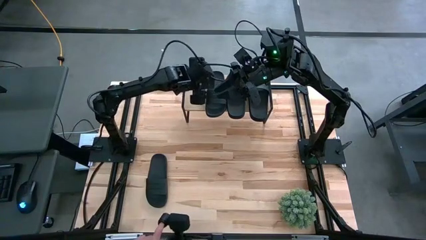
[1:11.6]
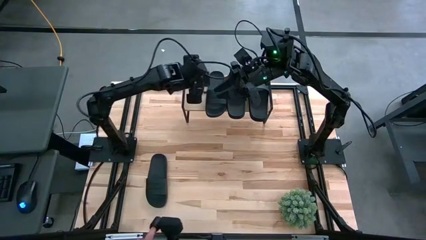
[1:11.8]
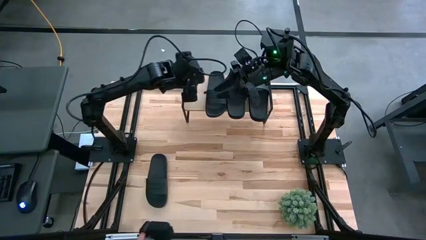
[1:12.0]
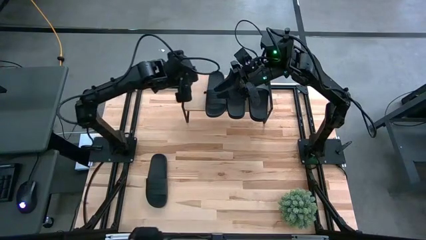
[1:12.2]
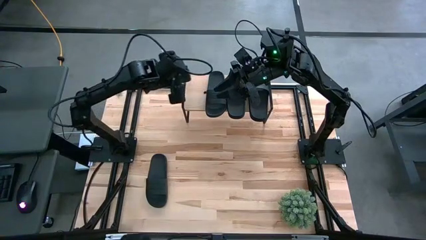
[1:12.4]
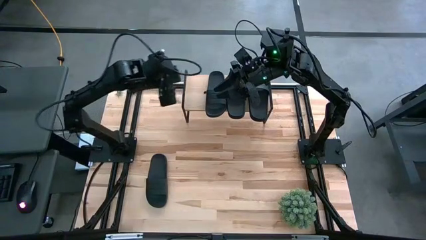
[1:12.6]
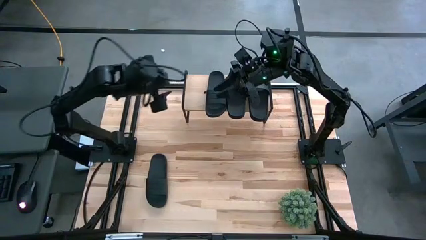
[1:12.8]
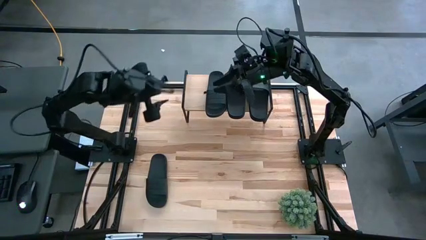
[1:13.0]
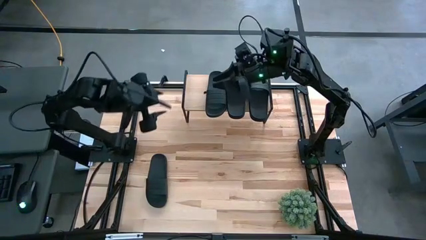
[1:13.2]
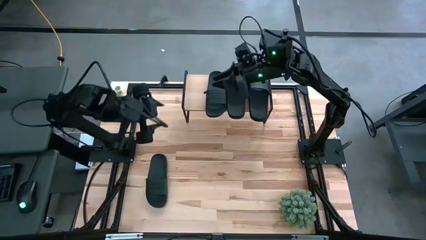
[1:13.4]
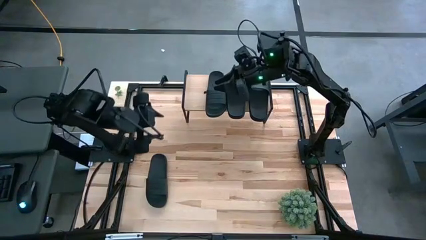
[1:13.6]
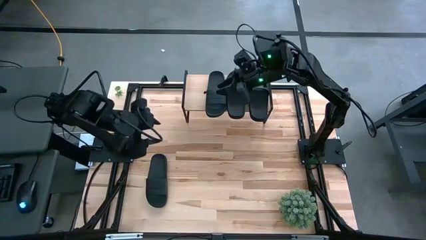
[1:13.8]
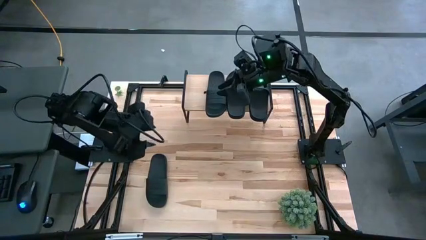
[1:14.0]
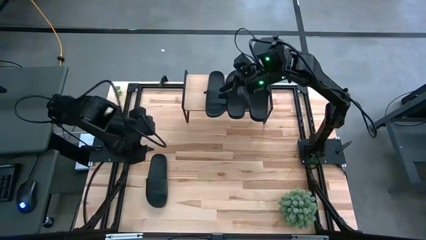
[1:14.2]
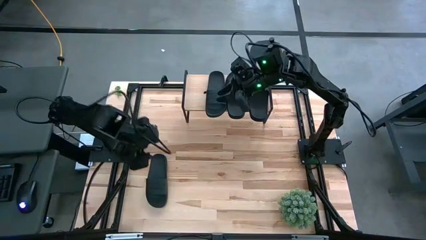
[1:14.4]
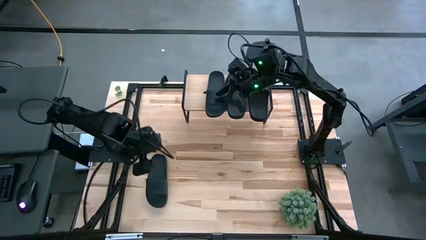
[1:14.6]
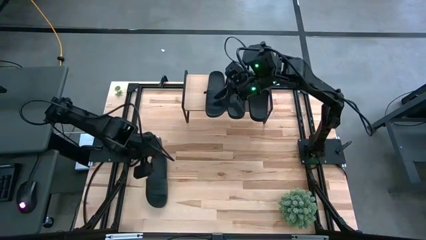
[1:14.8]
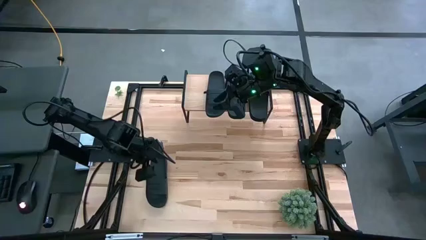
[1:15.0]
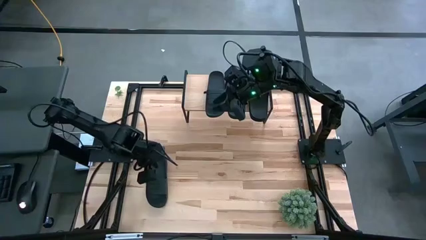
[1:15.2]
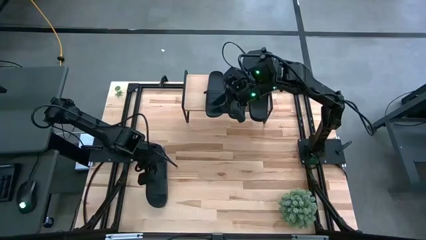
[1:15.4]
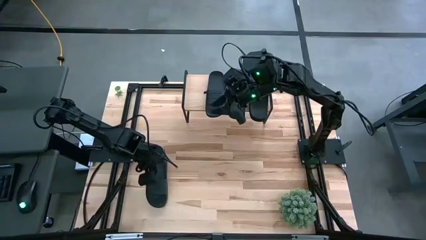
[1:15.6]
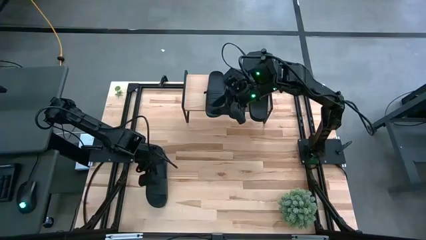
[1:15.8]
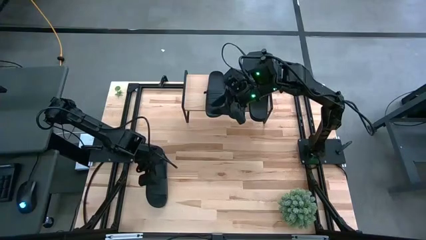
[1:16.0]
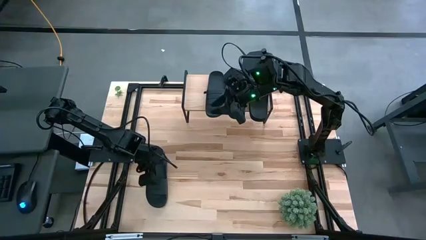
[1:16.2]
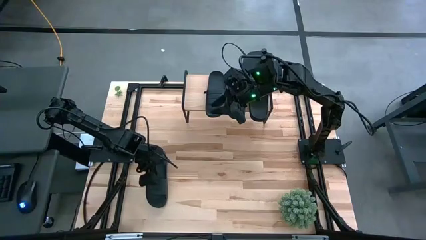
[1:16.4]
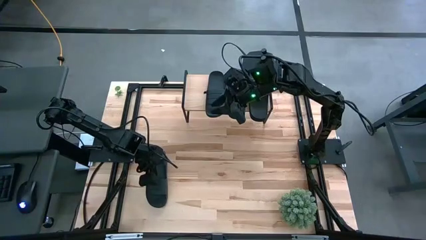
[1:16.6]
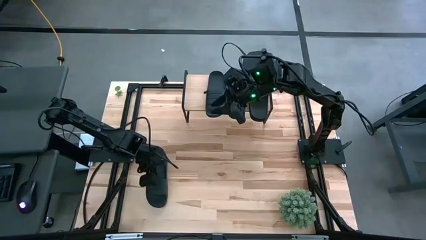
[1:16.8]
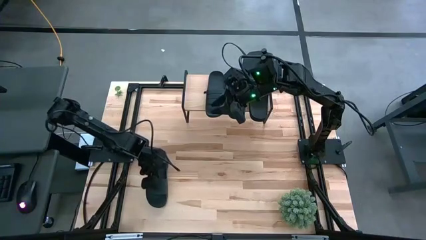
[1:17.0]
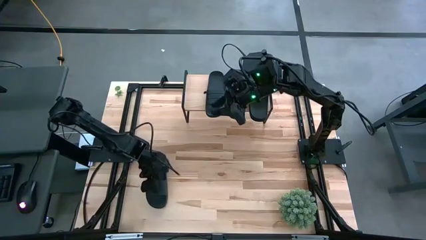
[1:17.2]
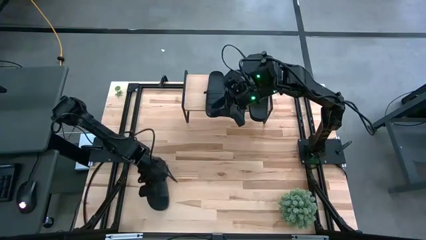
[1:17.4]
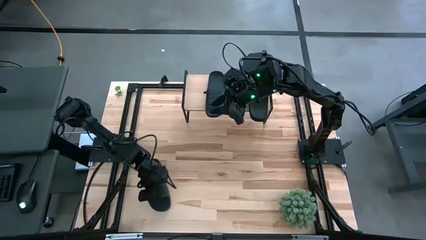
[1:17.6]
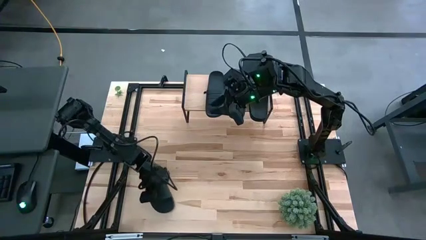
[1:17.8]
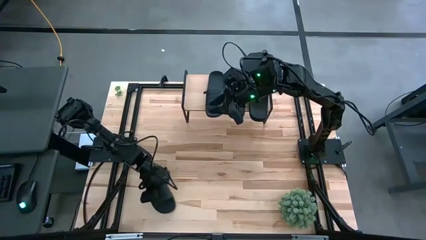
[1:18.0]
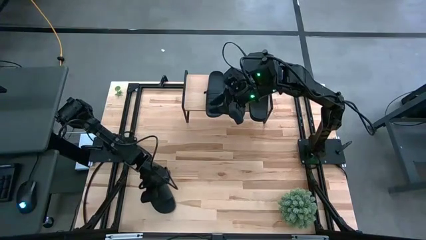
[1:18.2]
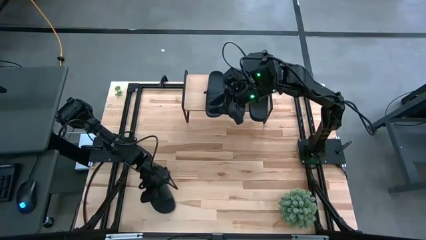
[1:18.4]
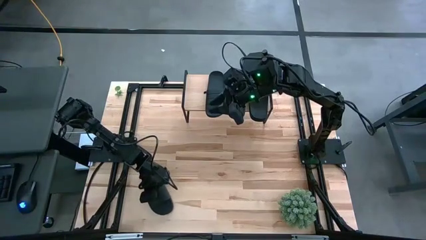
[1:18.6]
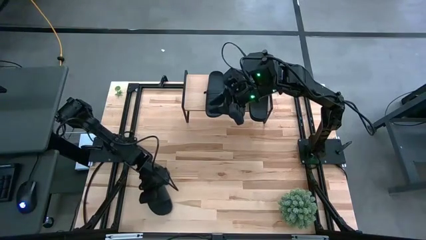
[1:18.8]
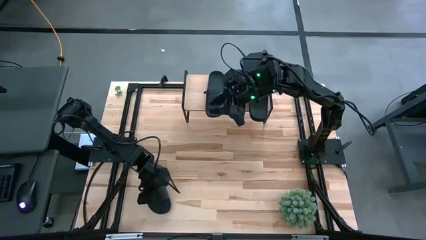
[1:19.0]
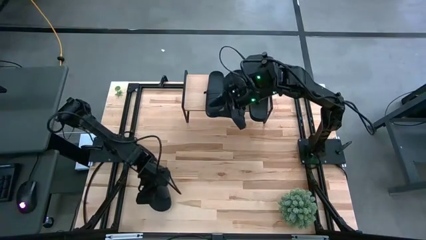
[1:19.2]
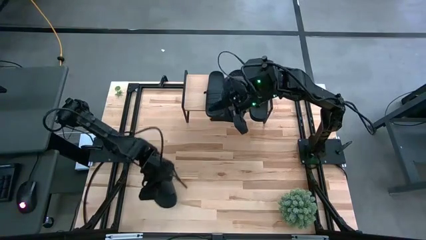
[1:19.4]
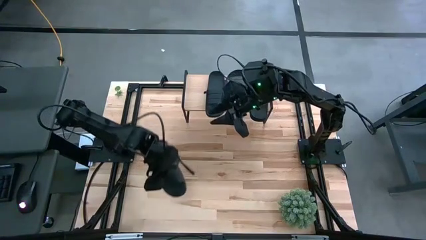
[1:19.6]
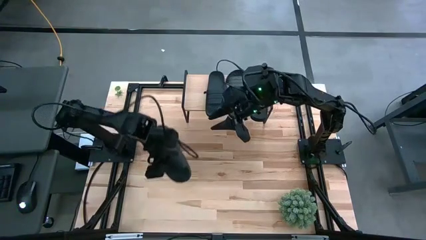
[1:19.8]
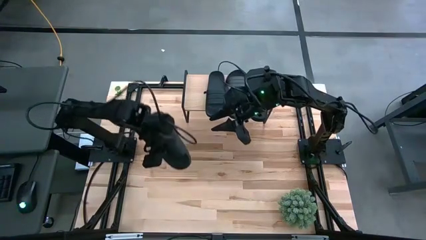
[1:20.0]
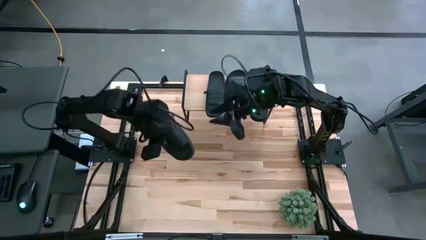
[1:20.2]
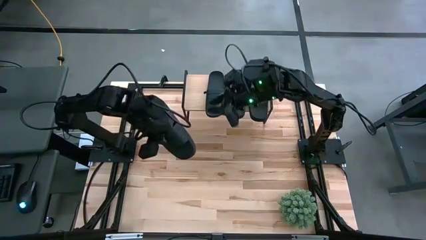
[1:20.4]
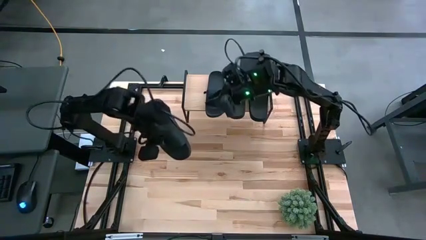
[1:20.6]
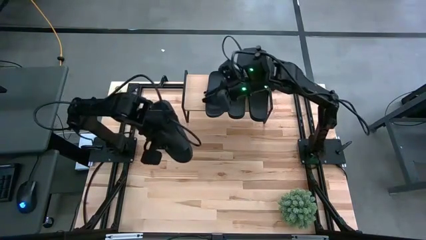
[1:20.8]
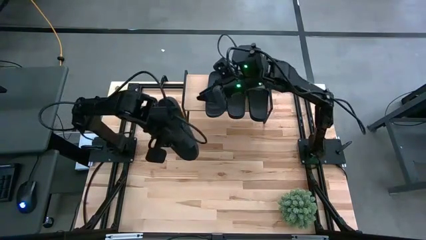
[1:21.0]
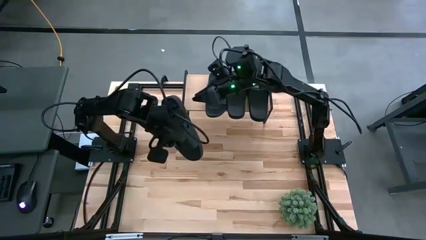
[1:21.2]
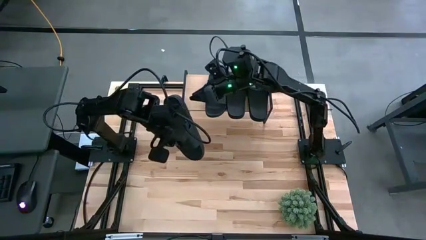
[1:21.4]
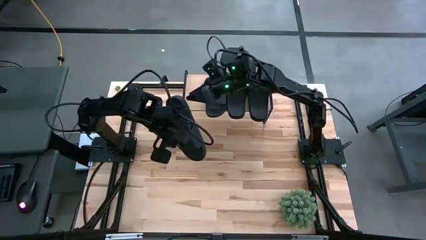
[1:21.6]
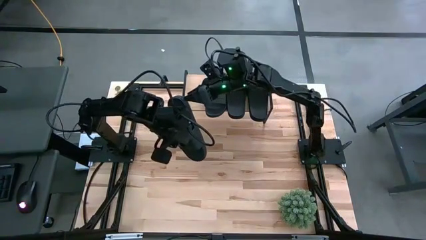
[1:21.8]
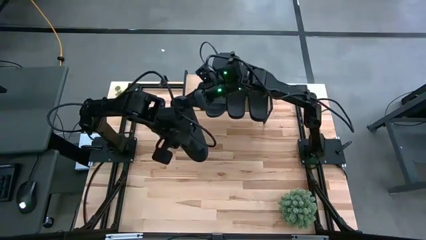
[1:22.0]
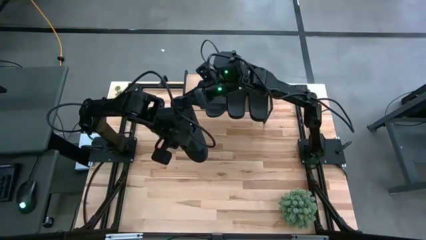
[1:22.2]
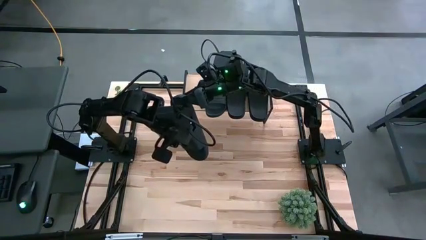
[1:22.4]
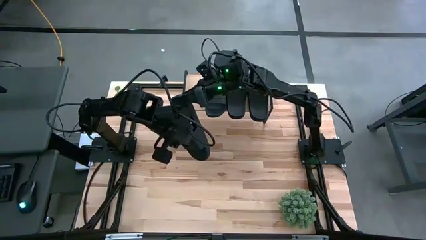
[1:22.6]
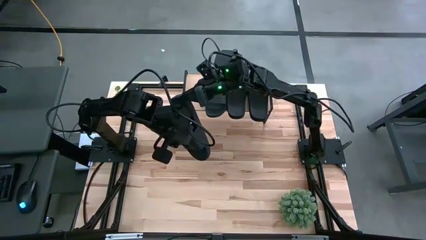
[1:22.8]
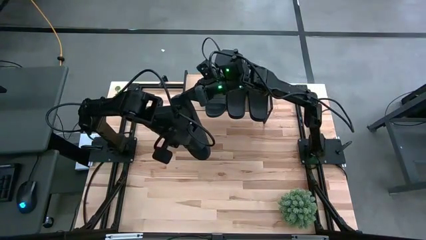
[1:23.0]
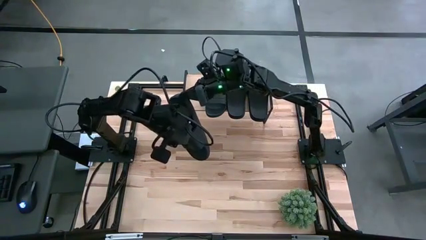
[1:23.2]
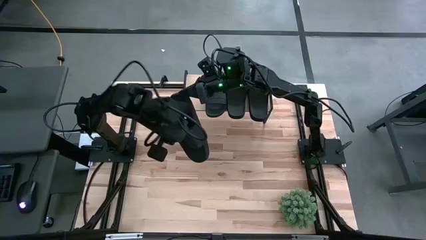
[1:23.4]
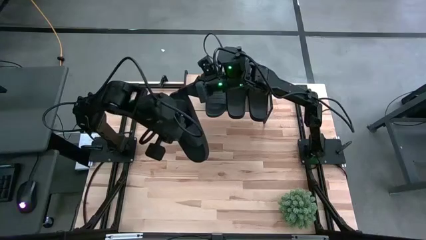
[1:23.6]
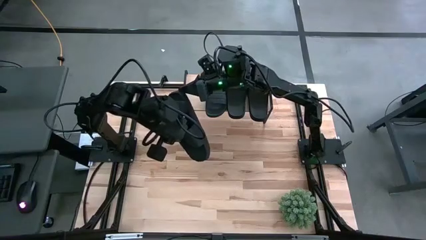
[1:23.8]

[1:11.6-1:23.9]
Task: Pick and place slides into the shelf
Put the black slide on the shelf

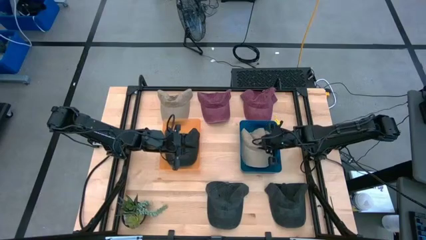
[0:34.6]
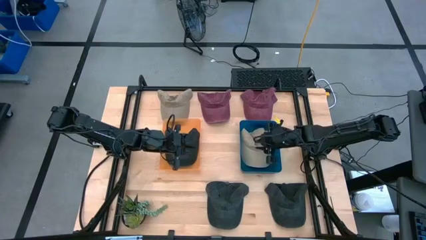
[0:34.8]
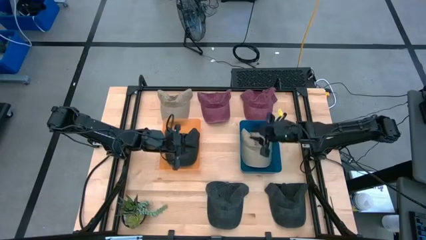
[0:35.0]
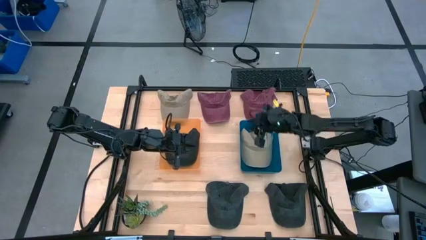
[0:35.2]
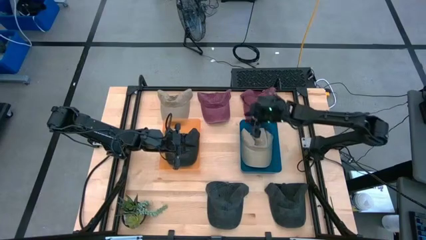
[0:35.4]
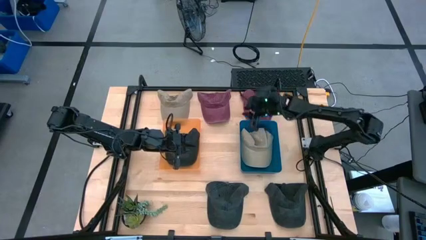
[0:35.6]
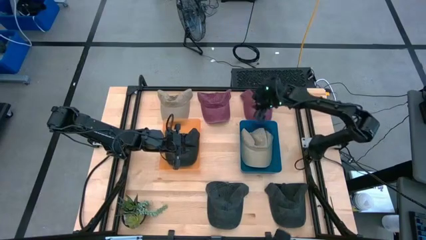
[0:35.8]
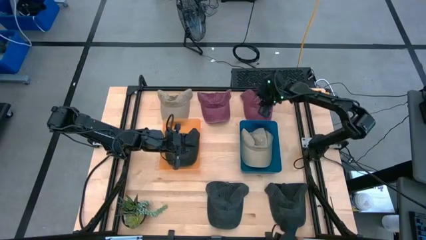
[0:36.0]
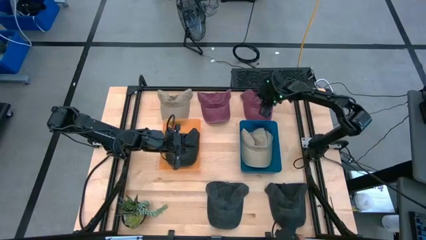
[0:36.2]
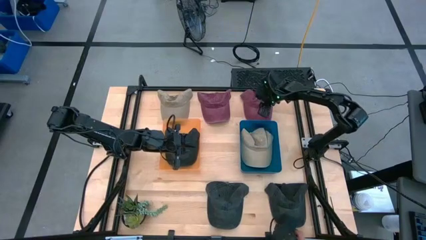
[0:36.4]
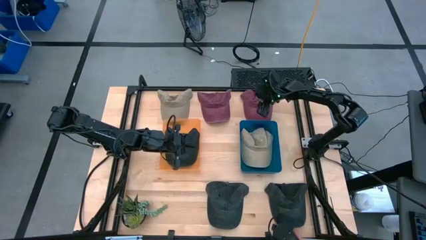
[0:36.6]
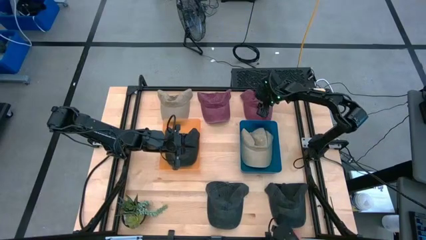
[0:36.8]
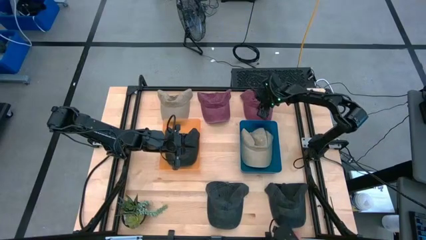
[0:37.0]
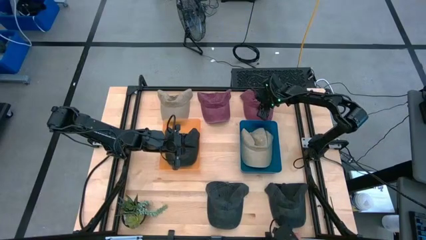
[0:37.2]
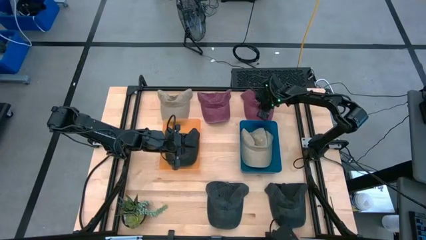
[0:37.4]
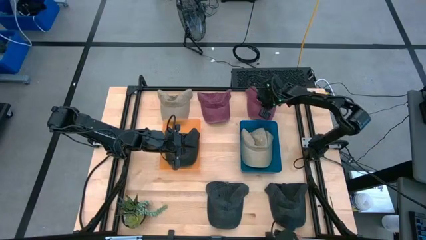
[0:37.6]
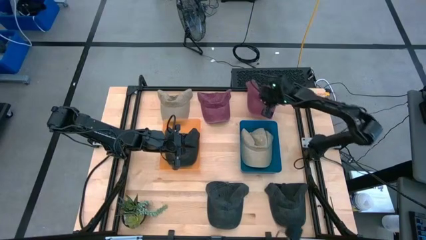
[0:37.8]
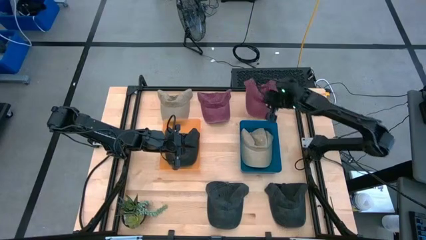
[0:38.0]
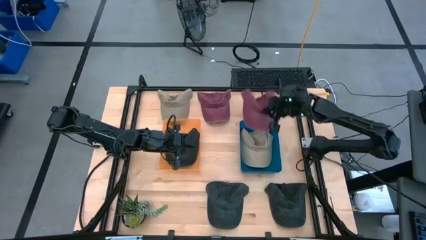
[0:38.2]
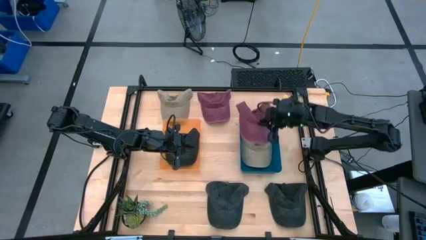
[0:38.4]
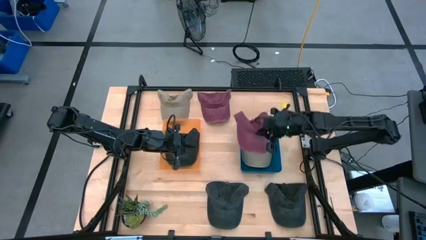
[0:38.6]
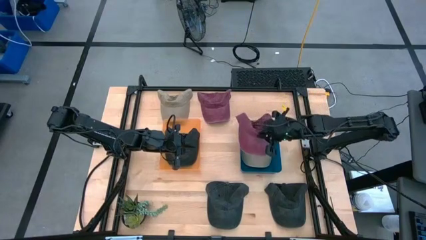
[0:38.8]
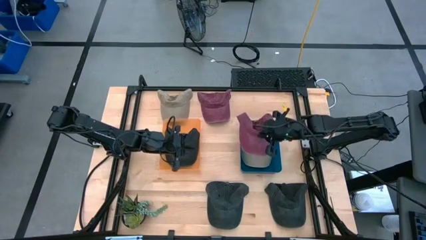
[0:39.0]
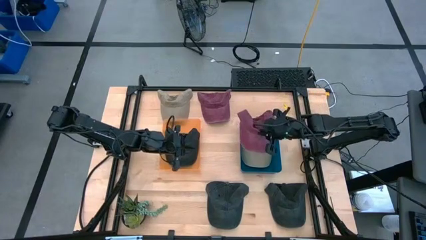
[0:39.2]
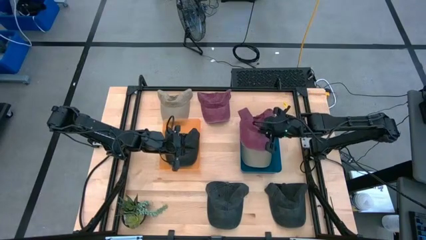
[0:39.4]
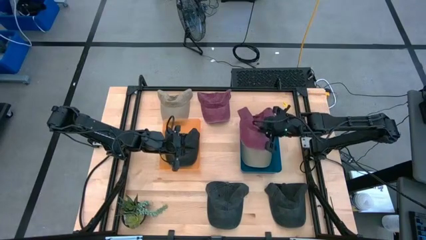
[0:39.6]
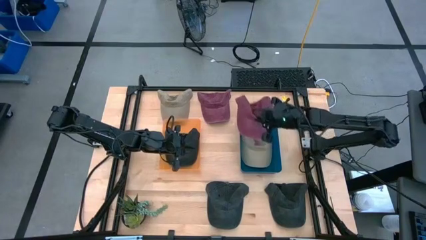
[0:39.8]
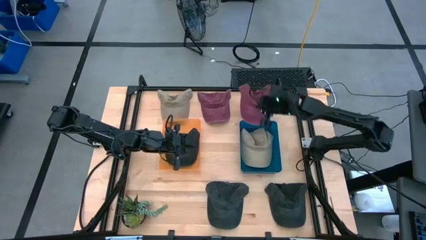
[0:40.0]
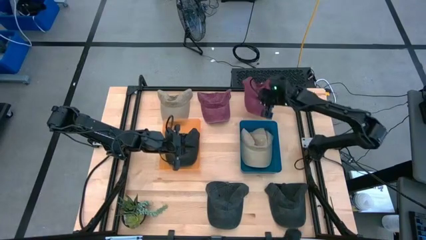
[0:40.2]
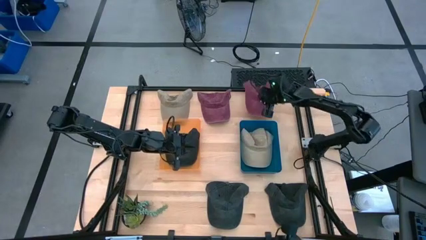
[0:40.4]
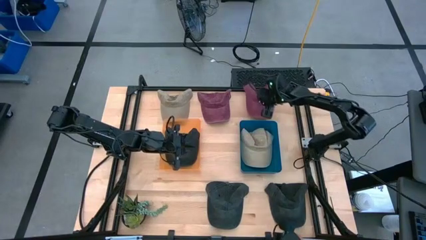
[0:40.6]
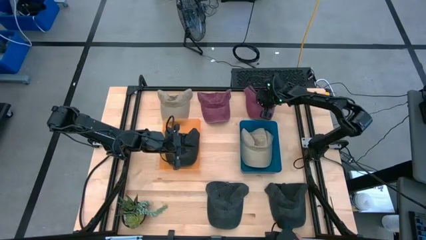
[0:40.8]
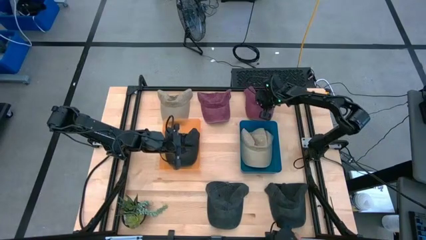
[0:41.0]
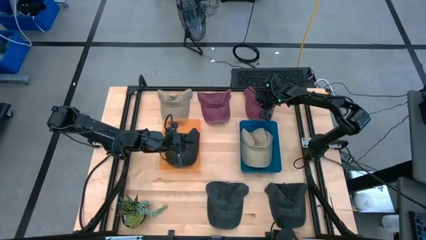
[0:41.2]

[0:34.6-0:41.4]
Task: Pick & Place hat
Put the right red cap into the blue bin
